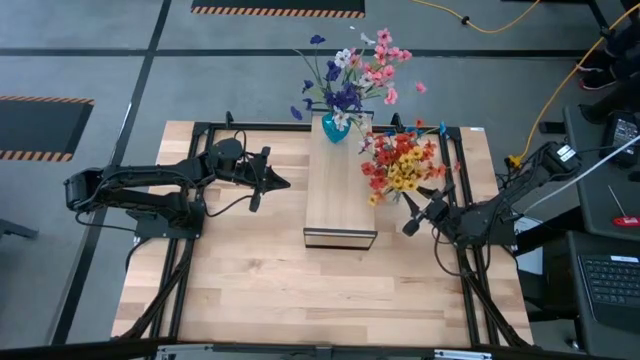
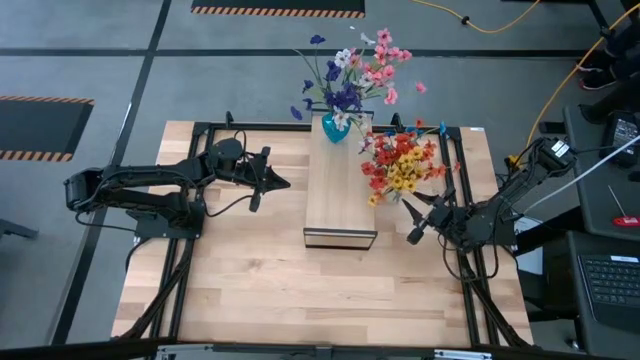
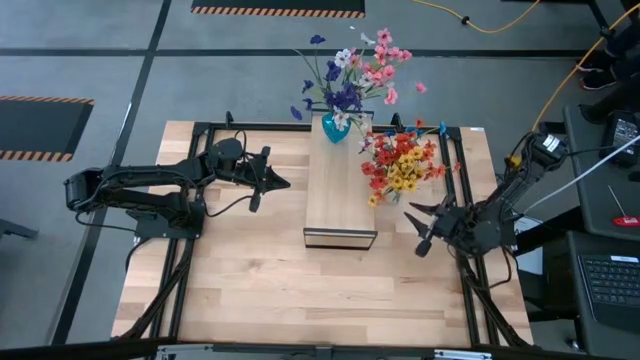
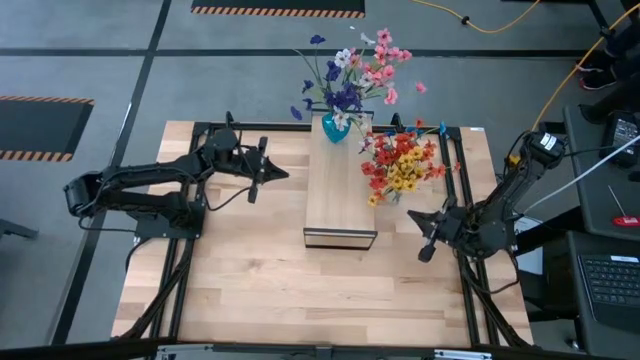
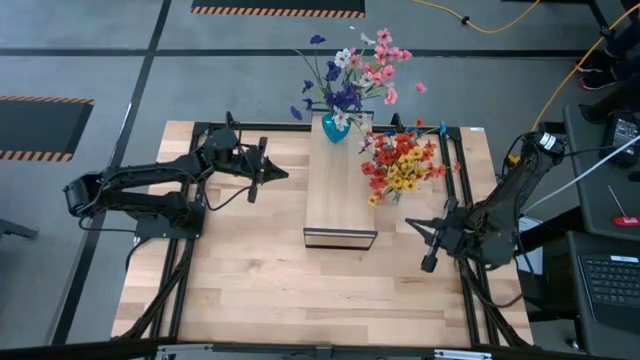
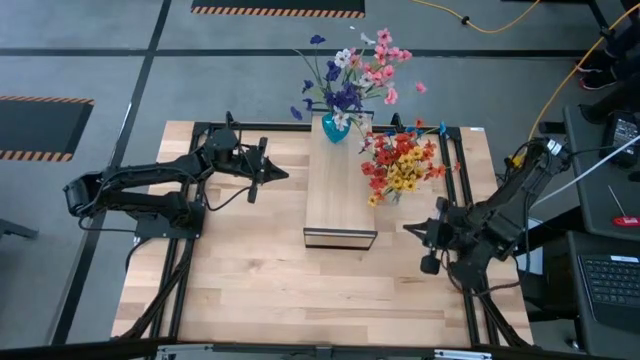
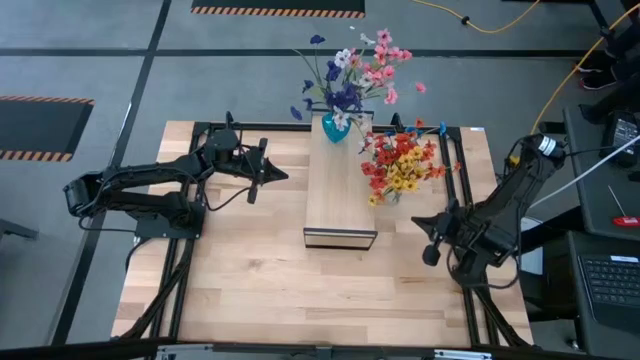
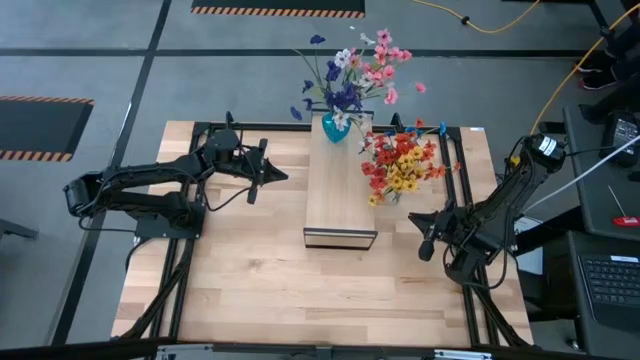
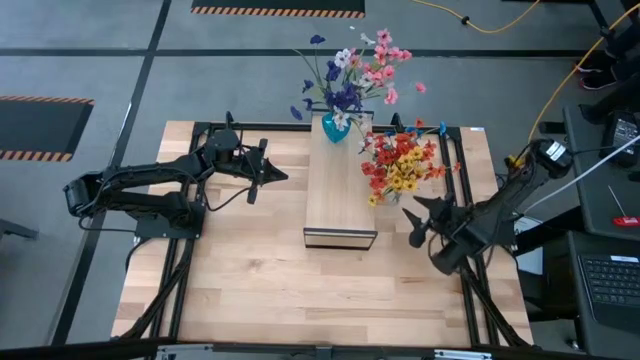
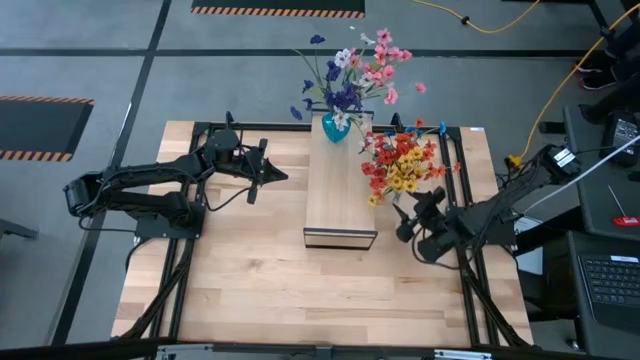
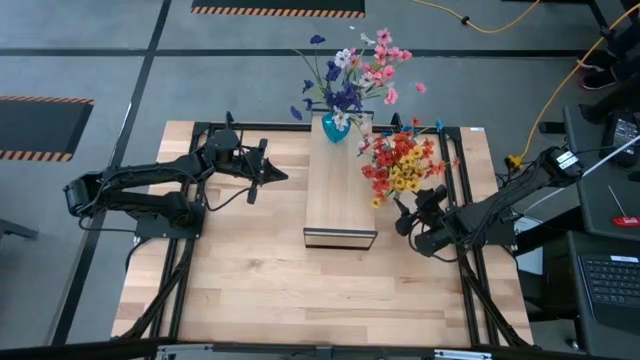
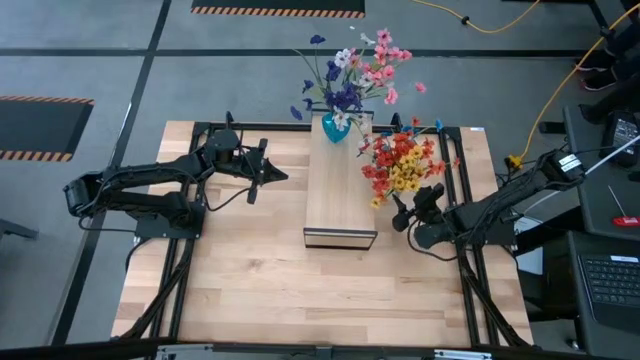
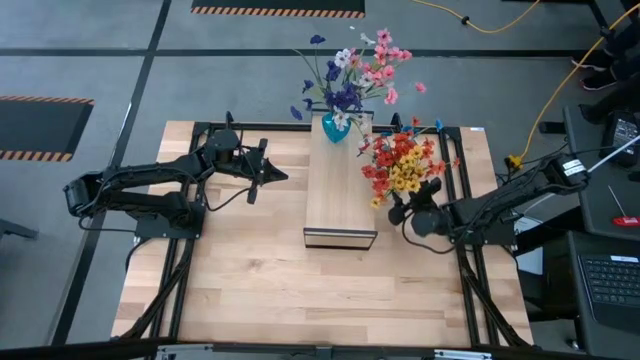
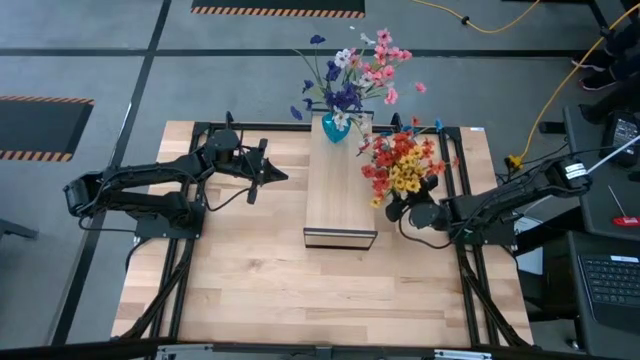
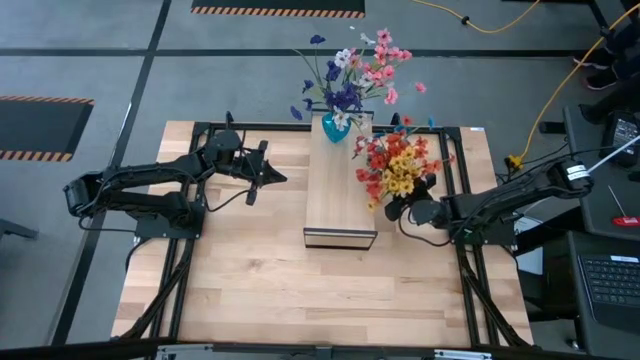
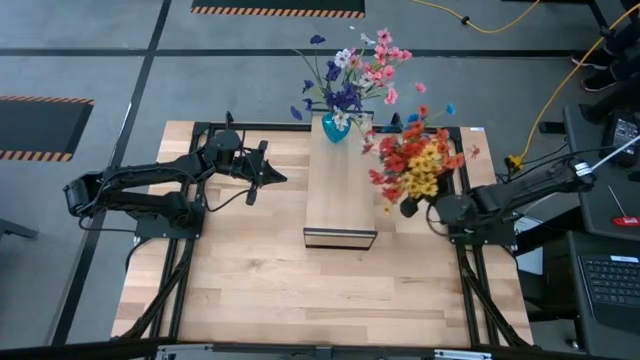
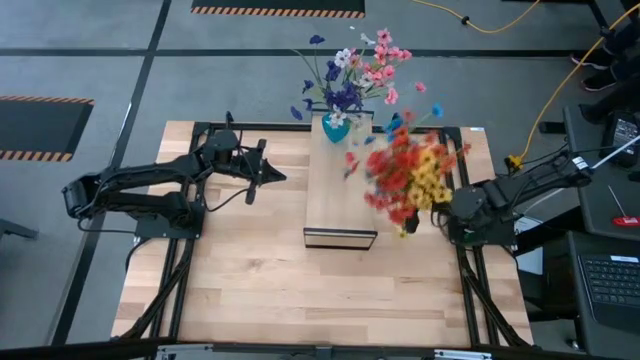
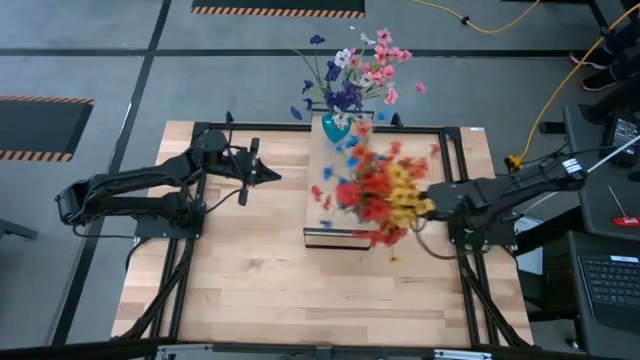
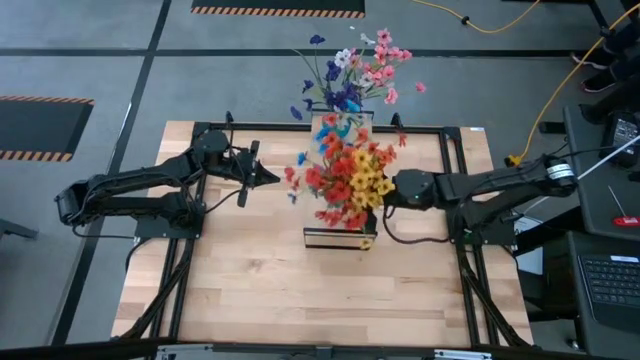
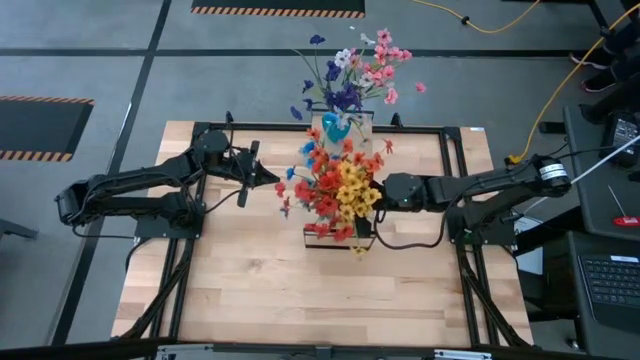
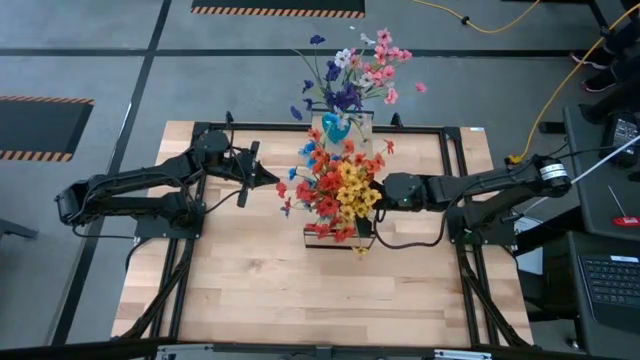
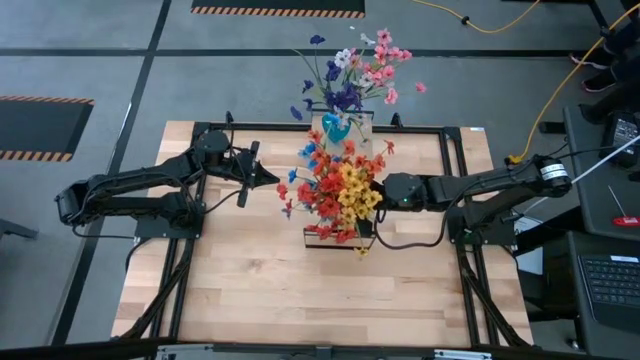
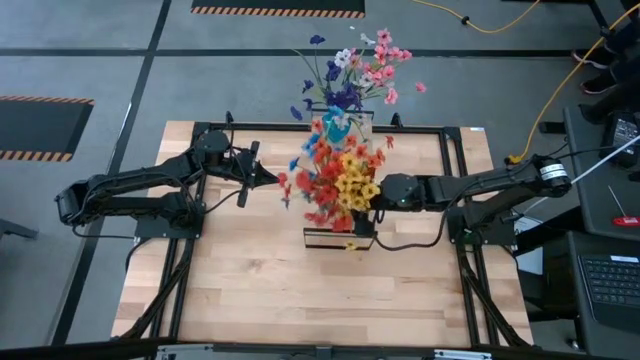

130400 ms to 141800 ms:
Task: Pick and place flowers into a vace then onto a shelf
Put the transparent vase on the shelf

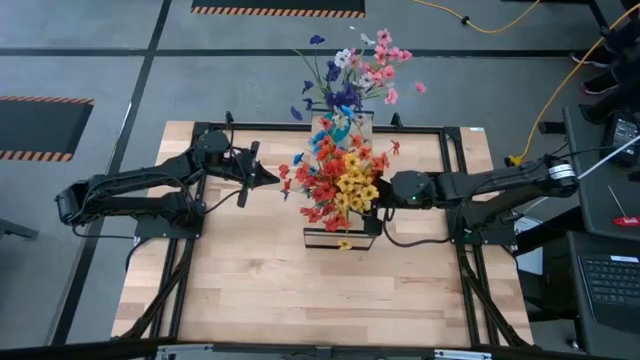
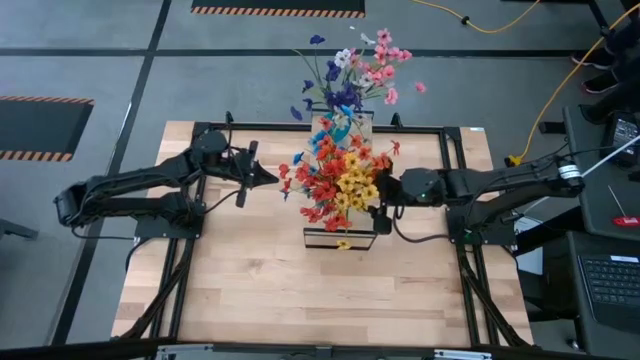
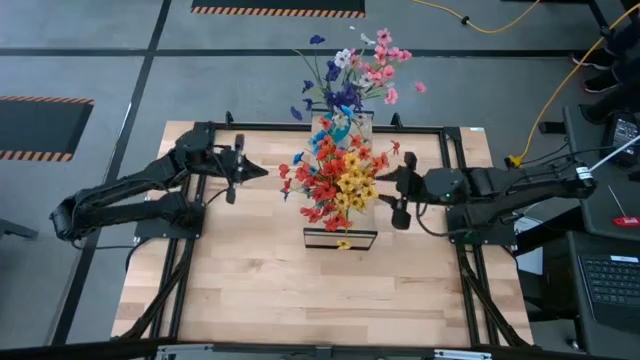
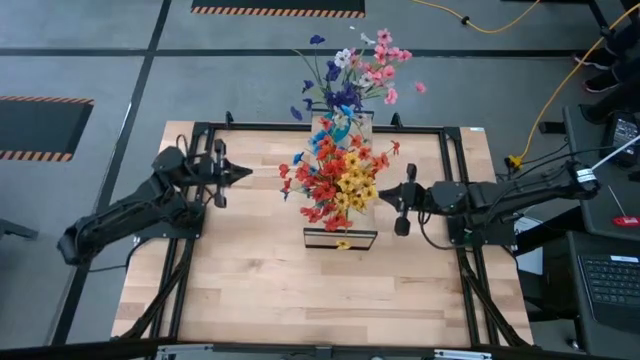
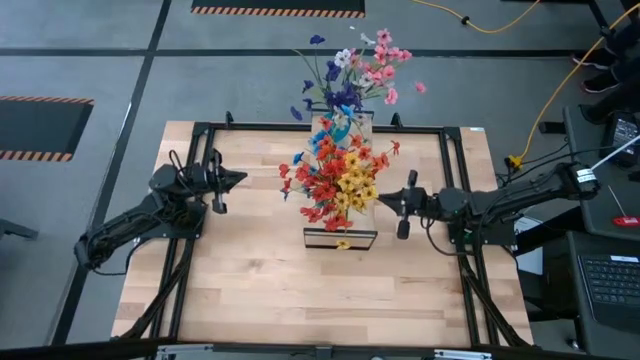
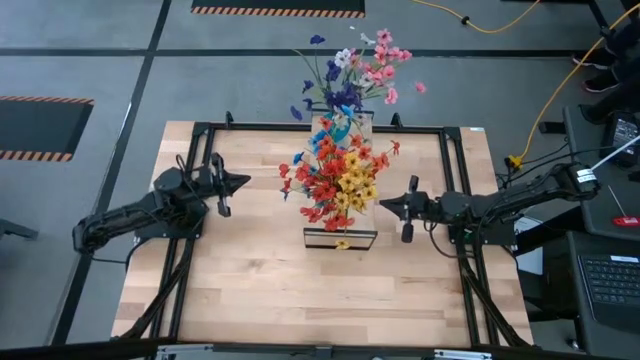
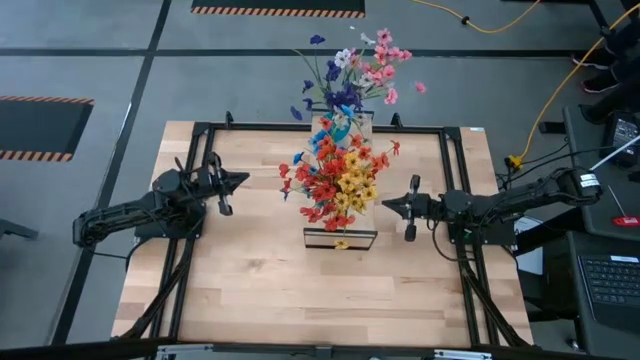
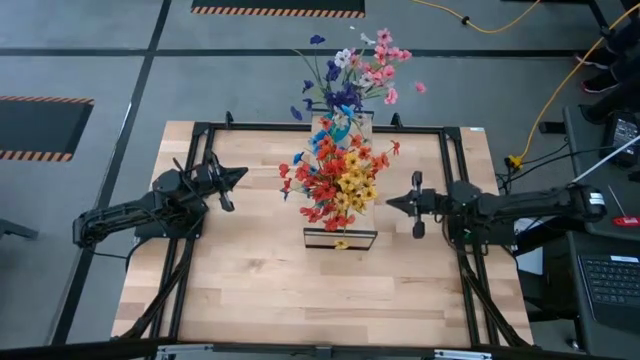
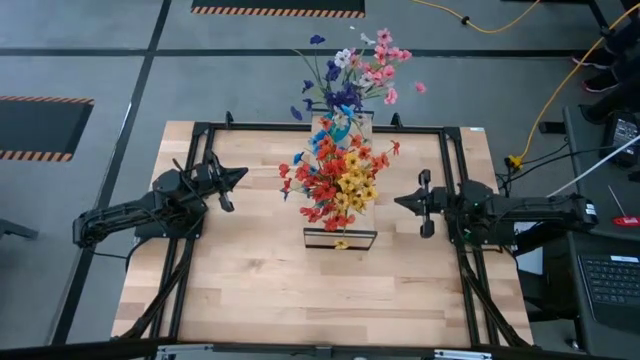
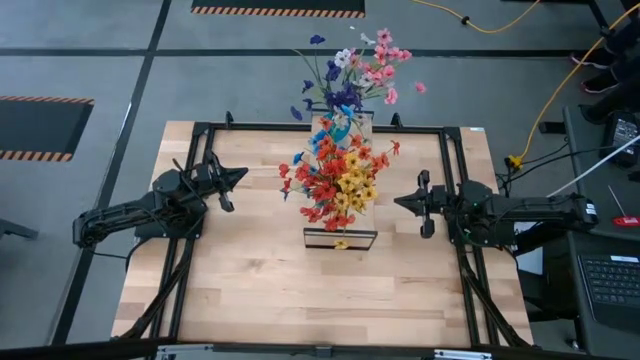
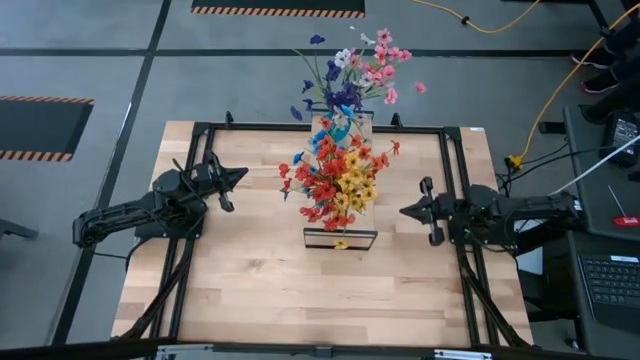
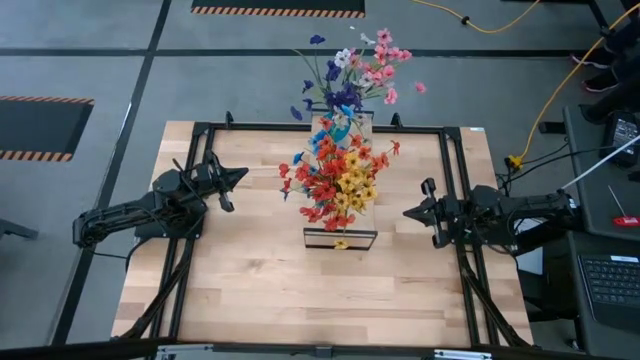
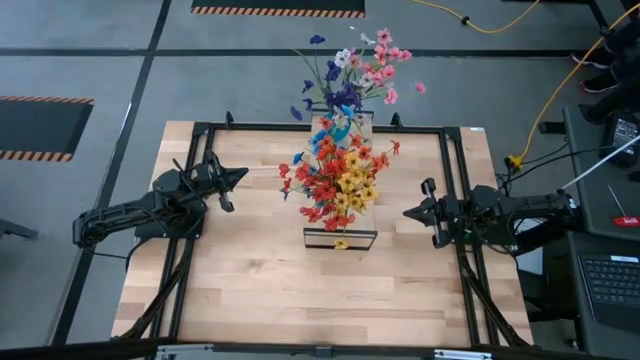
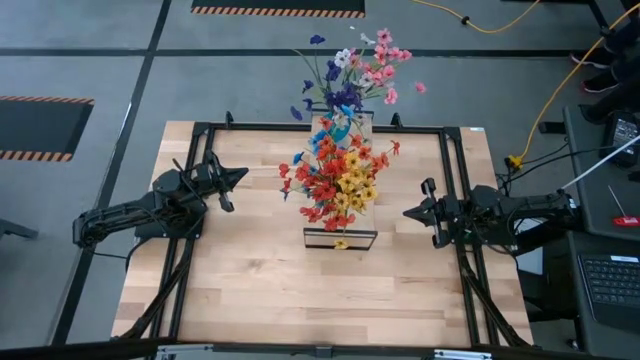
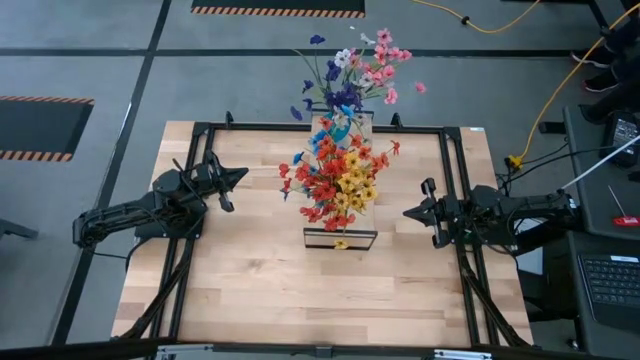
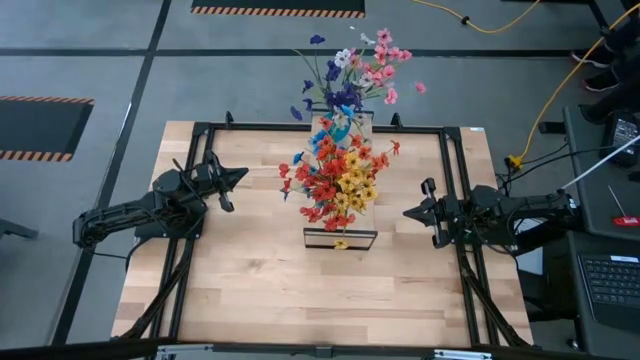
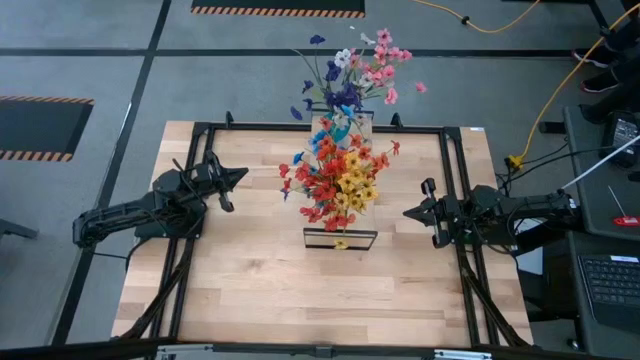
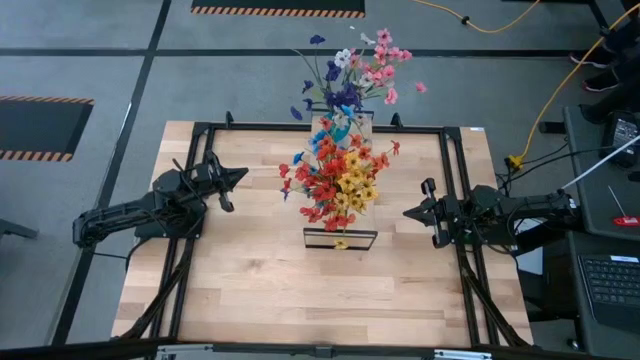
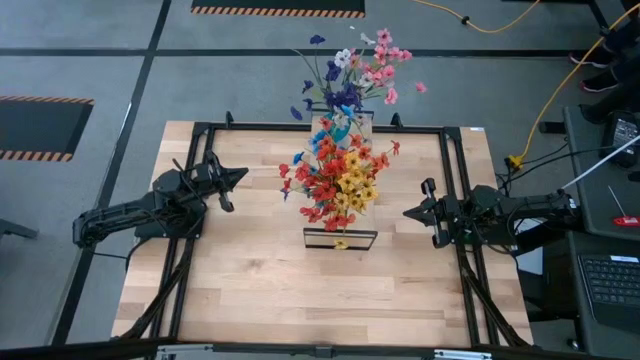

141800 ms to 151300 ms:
Return to Home Position
